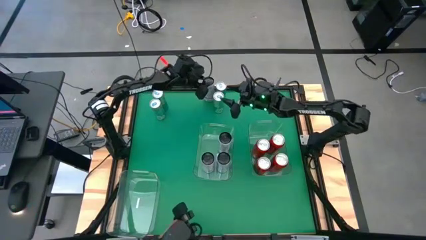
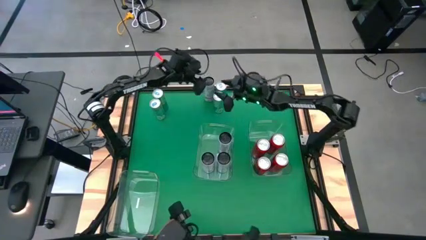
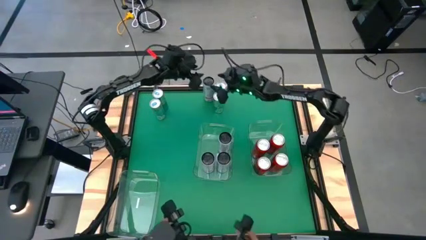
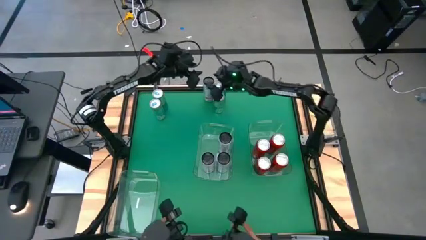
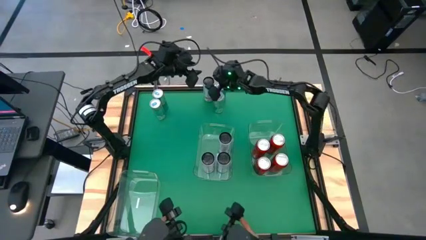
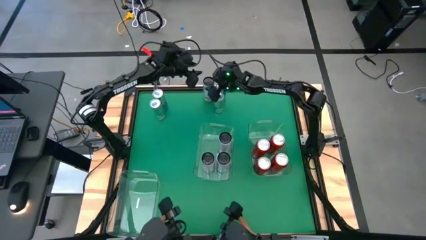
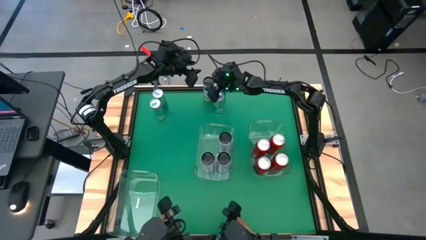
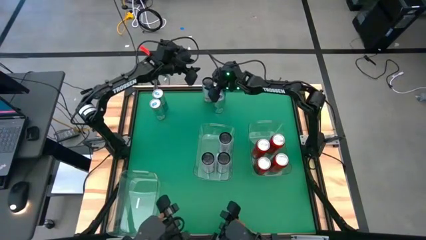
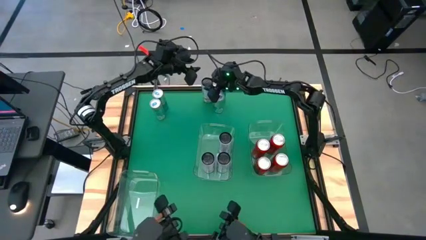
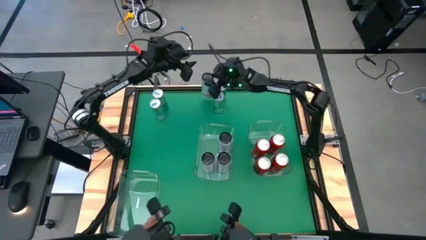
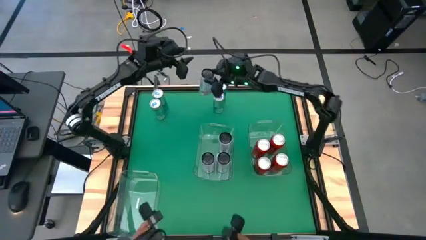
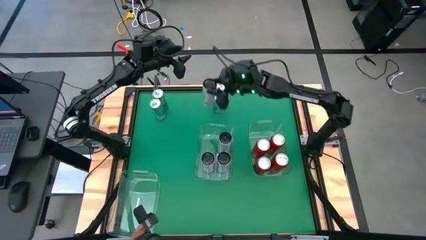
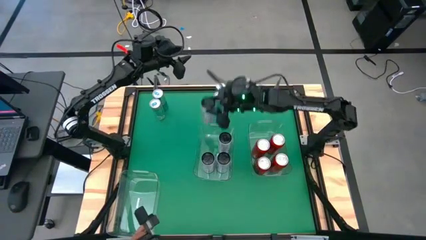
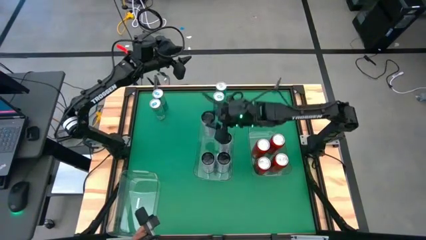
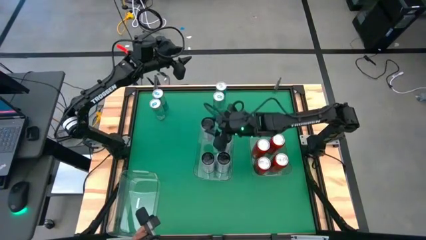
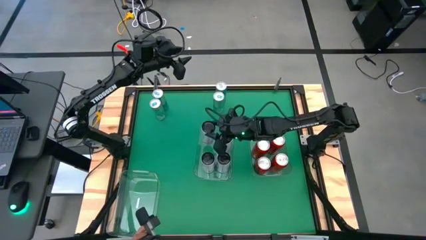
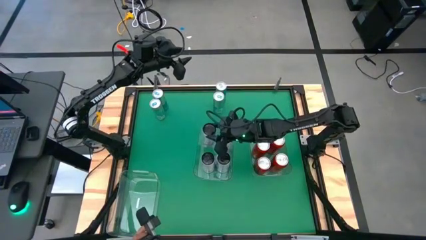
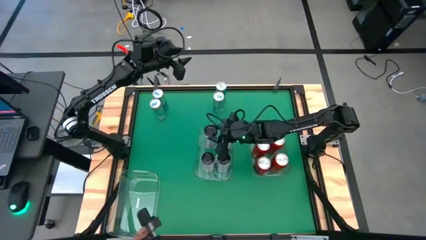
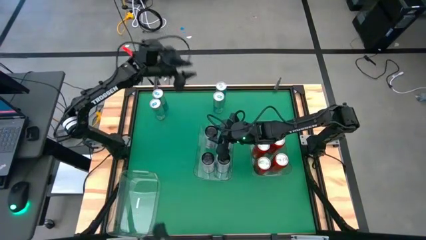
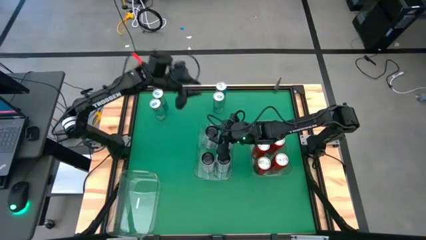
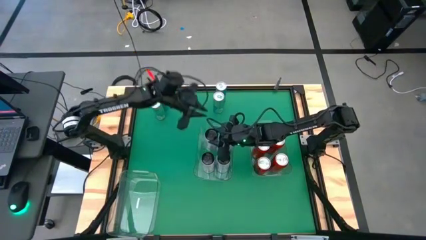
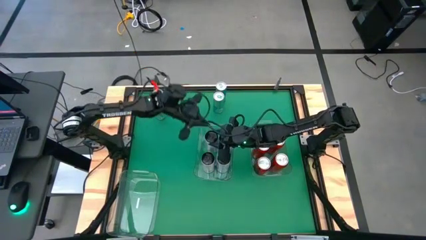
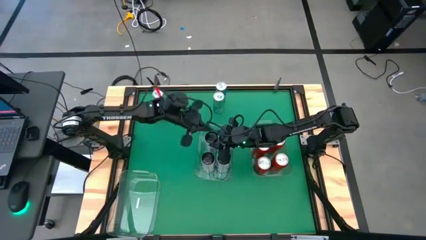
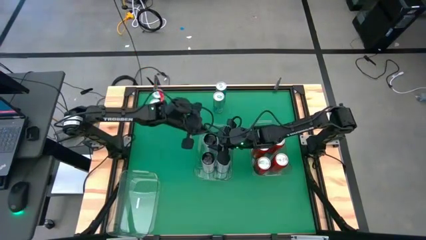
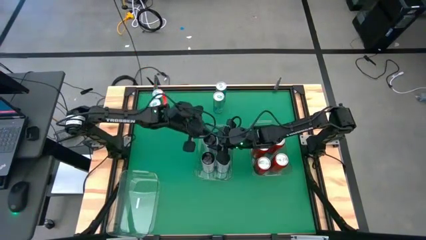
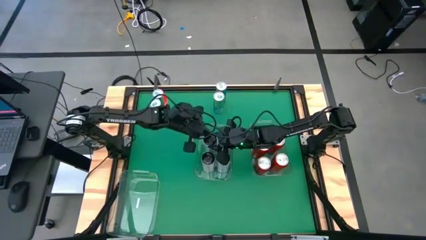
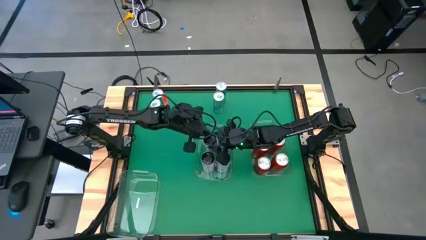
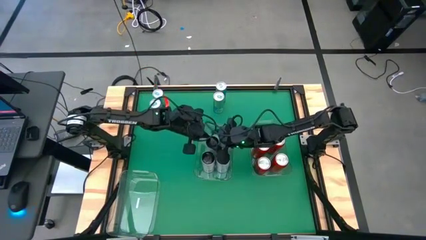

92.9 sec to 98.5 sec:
Task: Sort soda cans
Put the white-pink soda can into the top left transparent bin

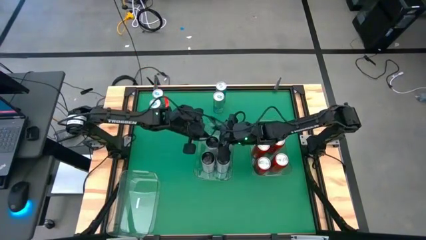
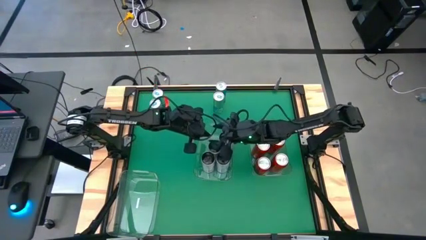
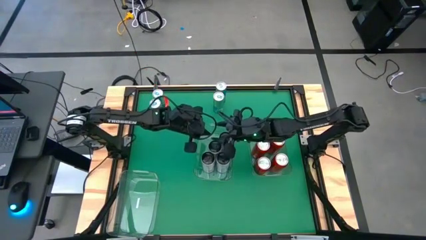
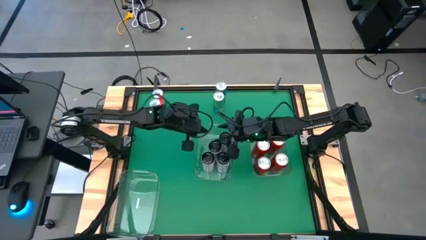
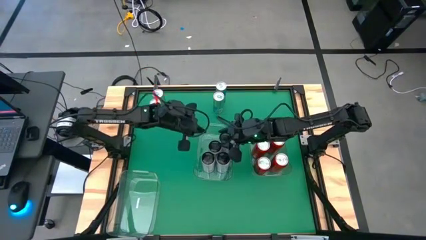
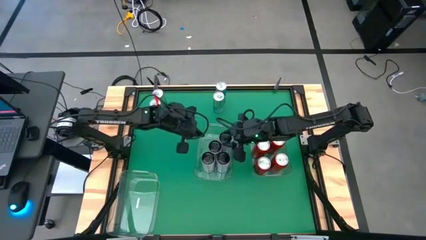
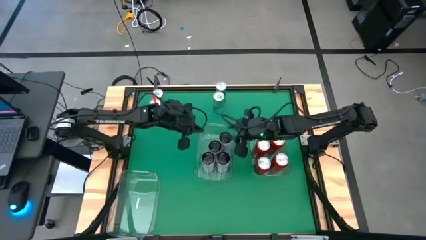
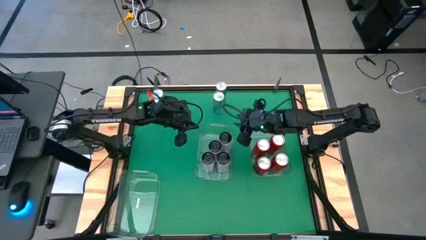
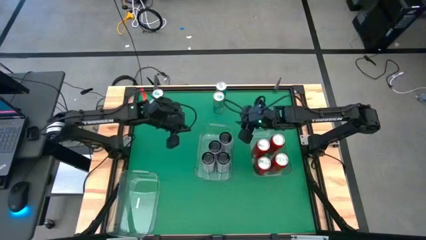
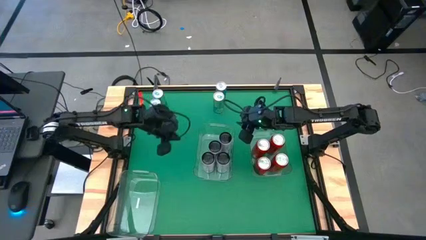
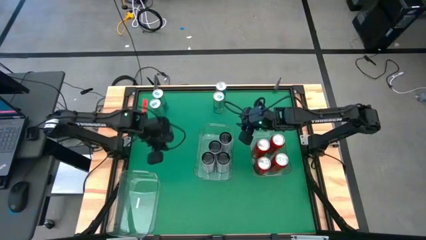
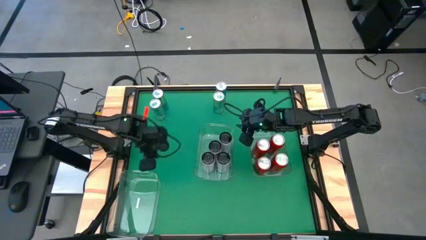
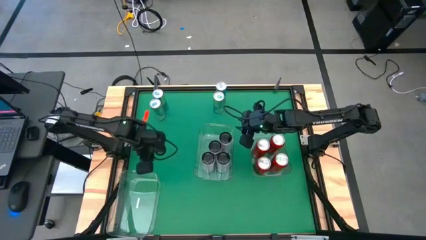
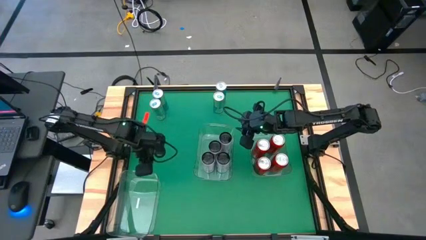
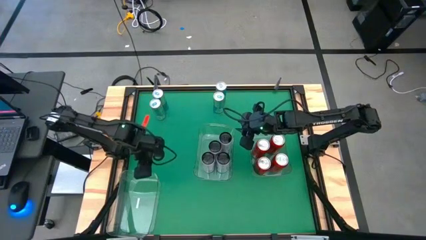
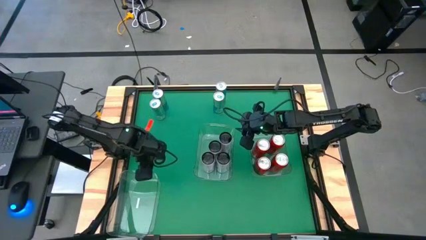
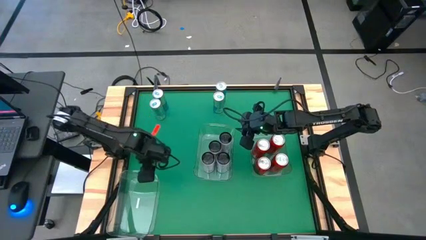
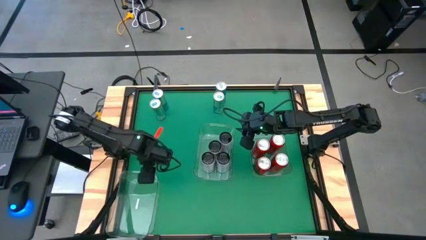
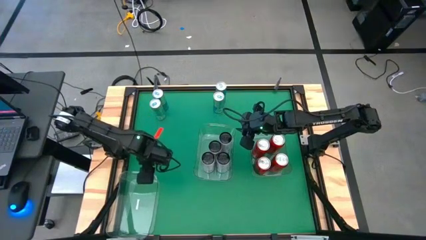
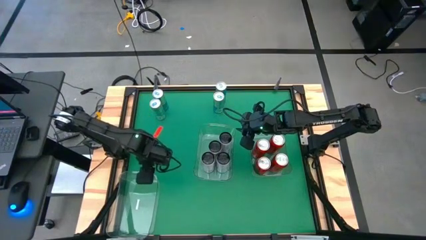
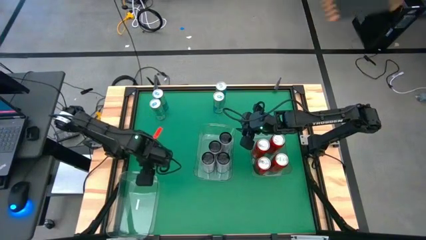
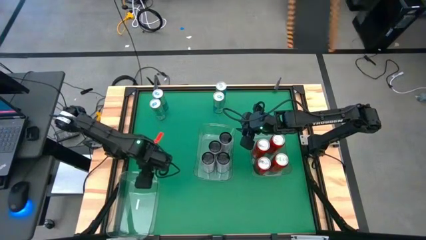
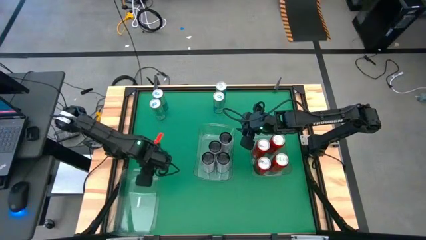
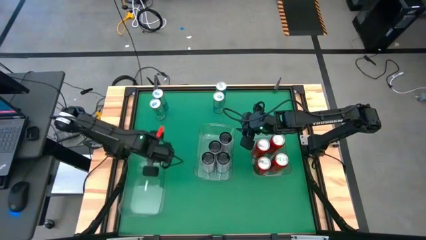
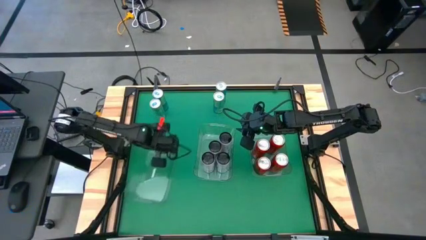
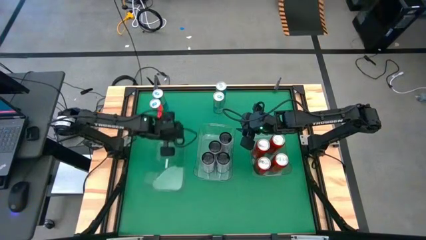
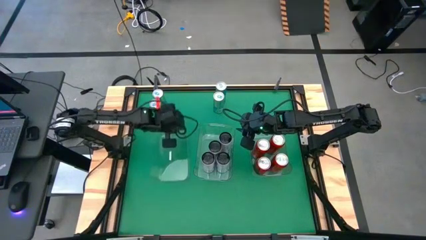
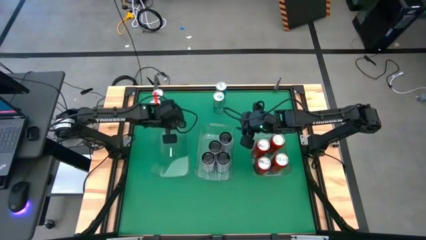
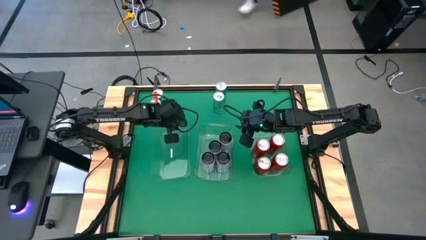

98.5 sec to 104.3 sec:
Move the bottom left transparent bin beside the top left transparent bin

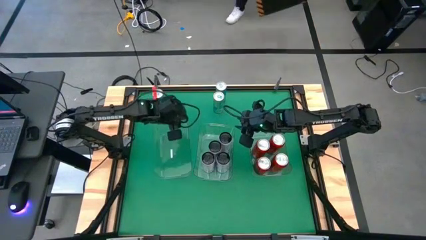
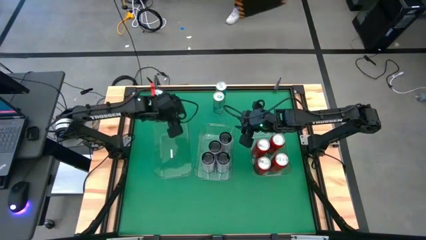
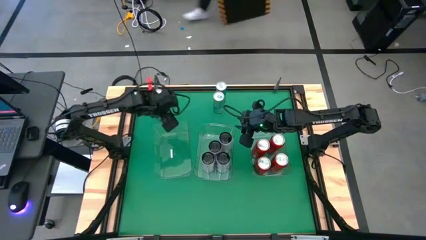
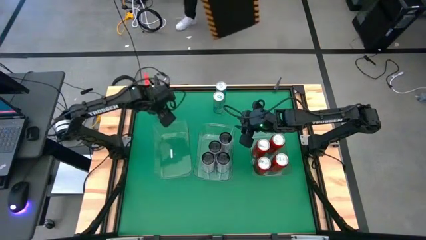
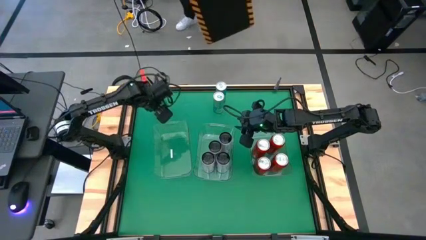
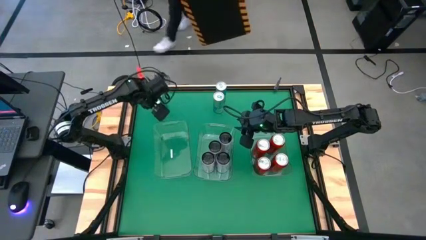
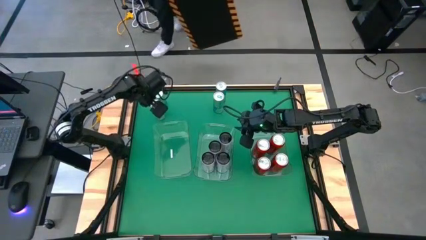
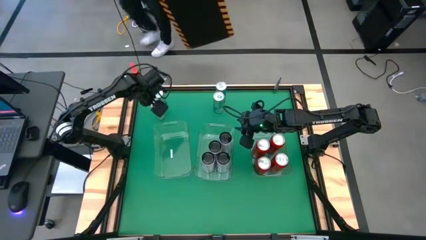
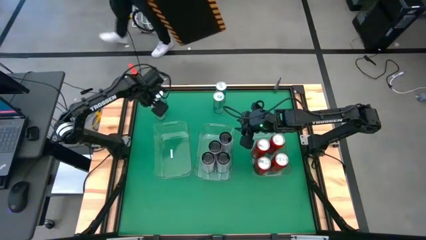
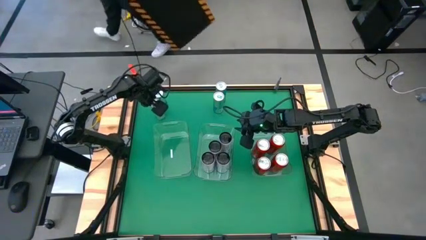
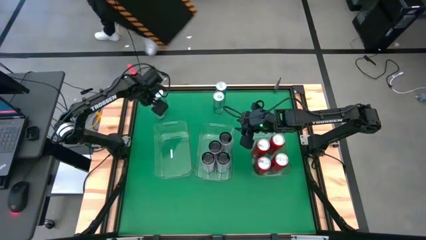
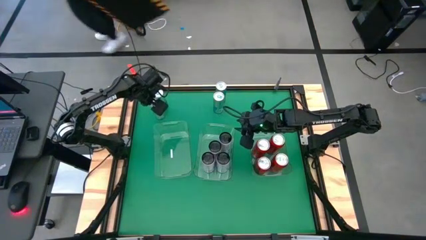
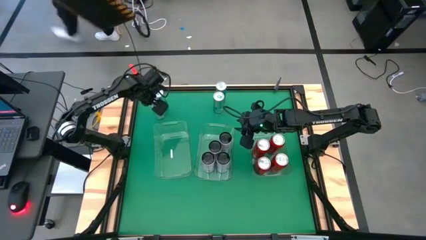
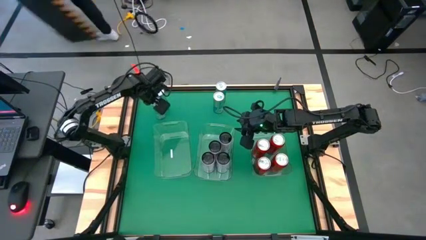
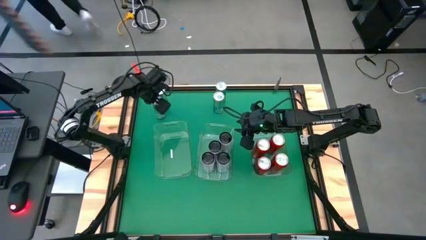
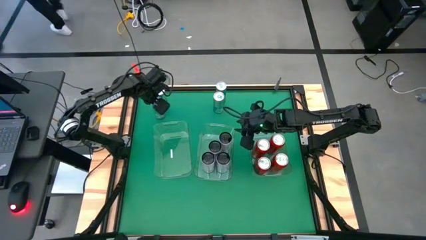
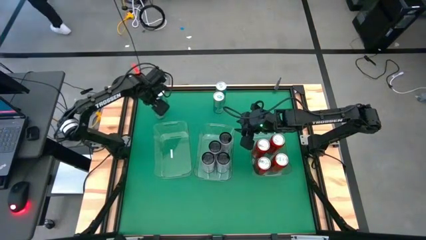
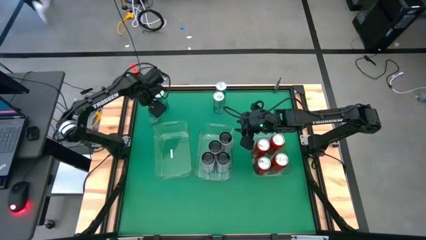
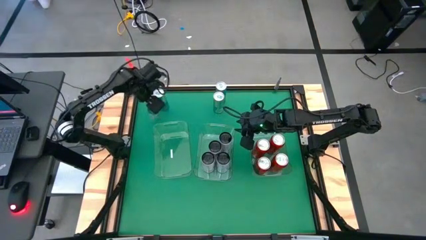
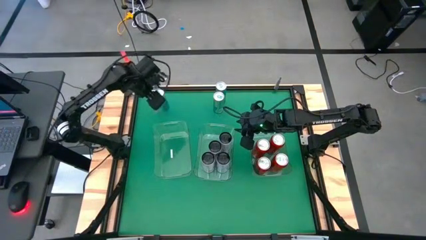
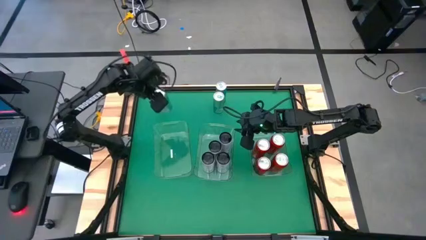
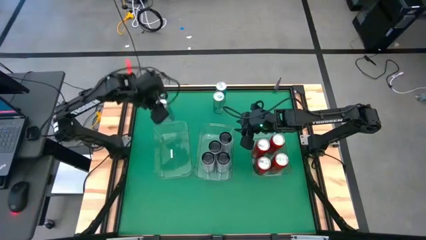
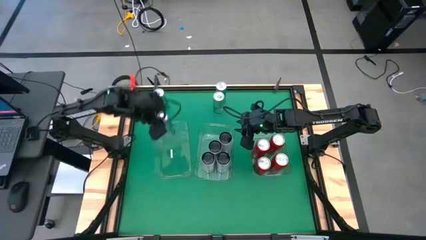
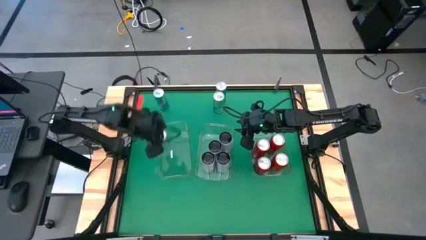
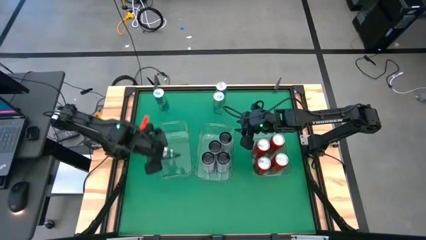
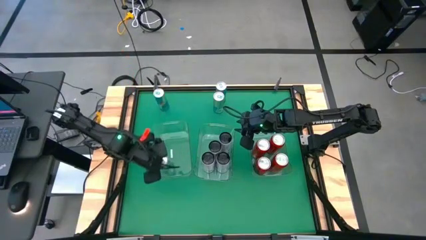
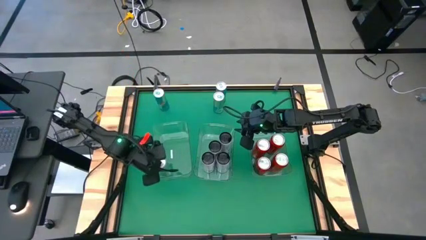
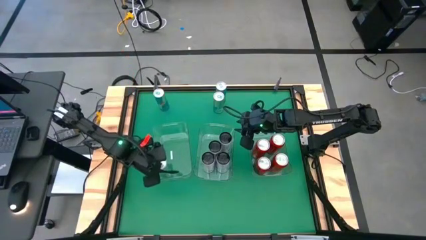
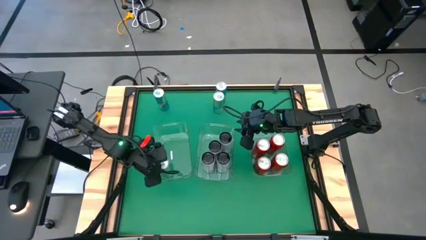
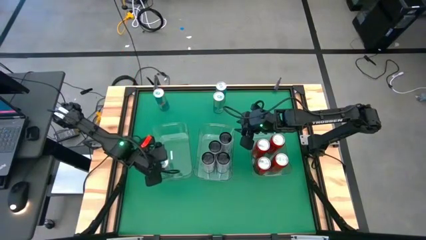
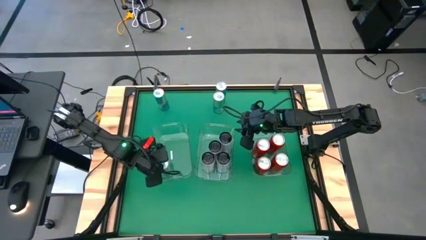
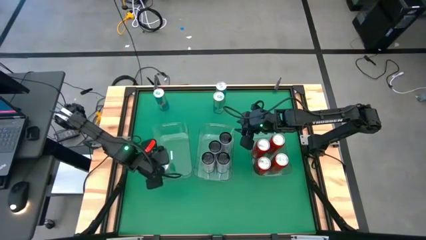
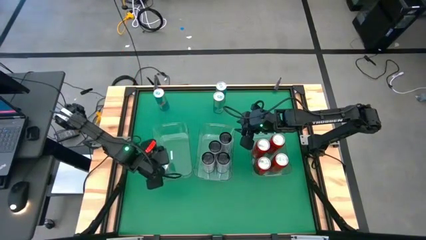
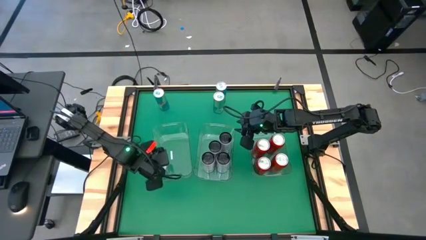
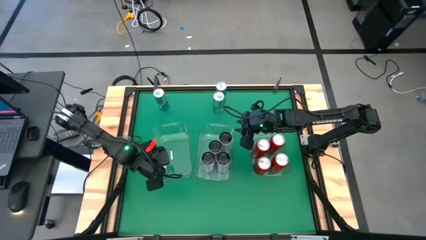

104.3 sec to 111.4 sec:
Put the bottom right blue soda can into the left transparent bin
